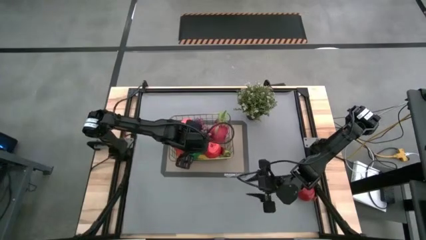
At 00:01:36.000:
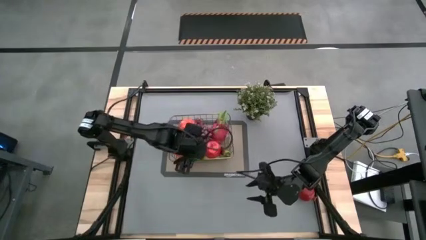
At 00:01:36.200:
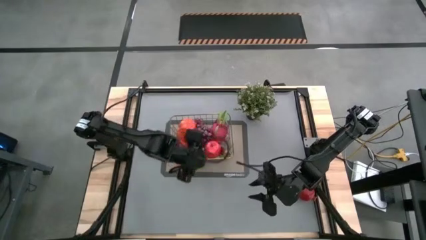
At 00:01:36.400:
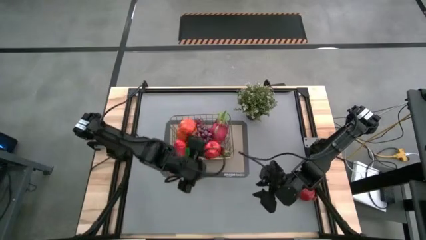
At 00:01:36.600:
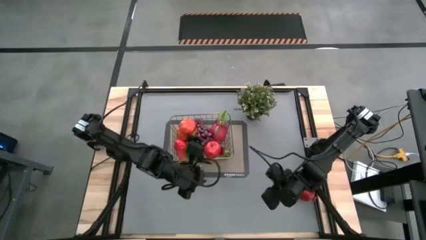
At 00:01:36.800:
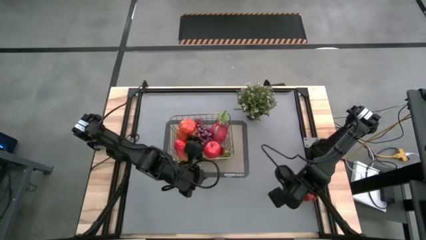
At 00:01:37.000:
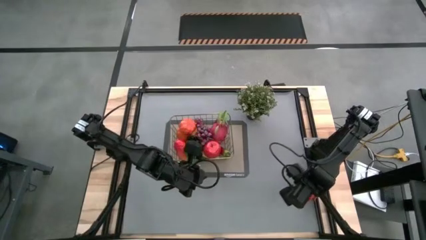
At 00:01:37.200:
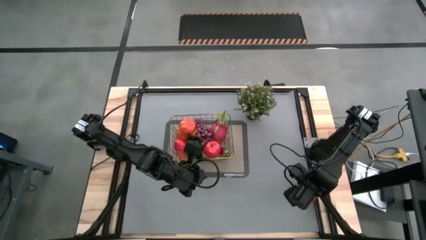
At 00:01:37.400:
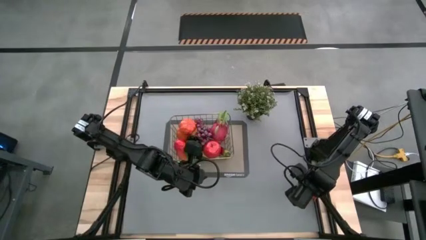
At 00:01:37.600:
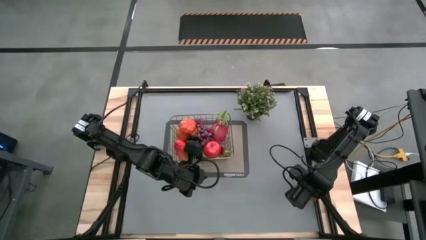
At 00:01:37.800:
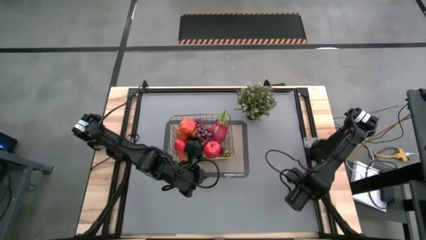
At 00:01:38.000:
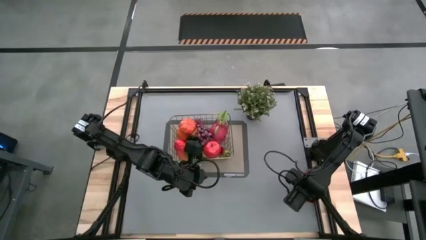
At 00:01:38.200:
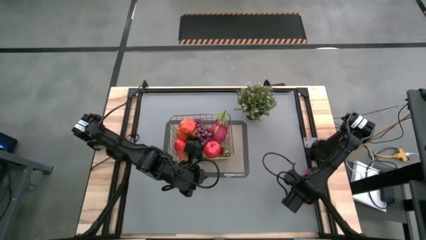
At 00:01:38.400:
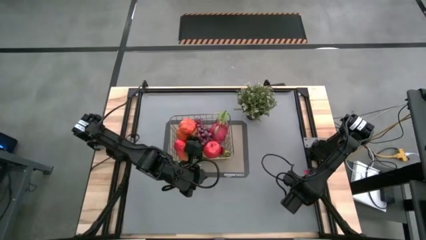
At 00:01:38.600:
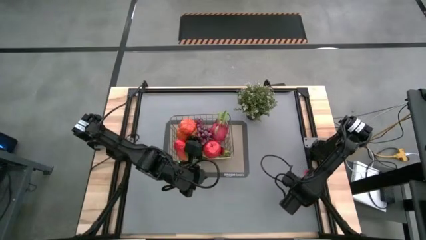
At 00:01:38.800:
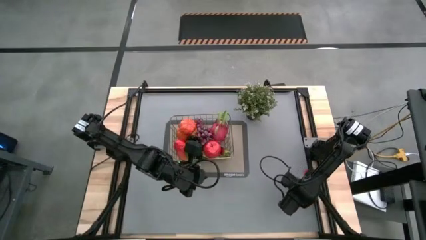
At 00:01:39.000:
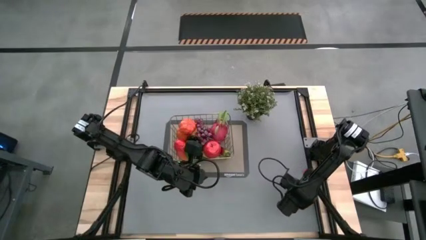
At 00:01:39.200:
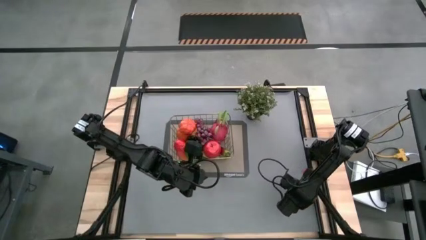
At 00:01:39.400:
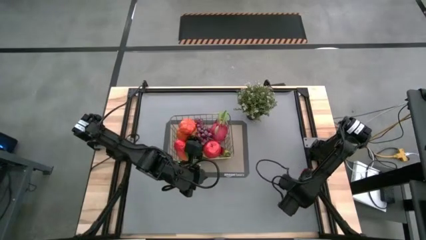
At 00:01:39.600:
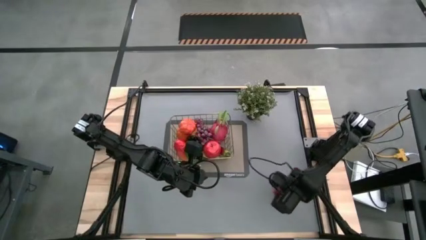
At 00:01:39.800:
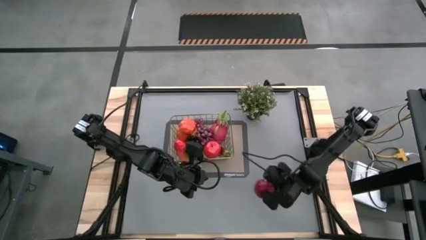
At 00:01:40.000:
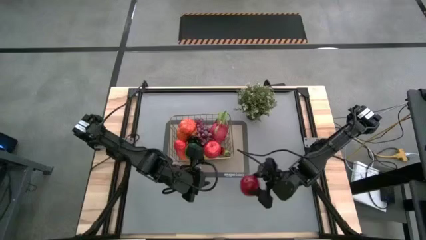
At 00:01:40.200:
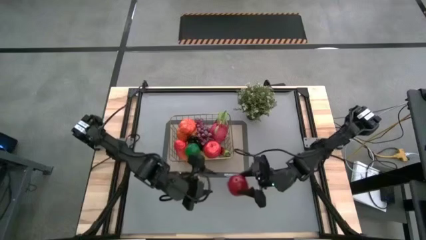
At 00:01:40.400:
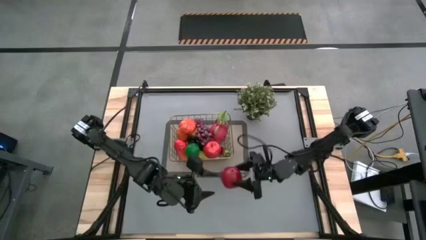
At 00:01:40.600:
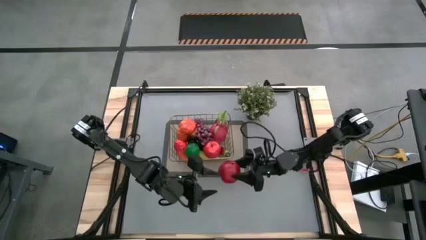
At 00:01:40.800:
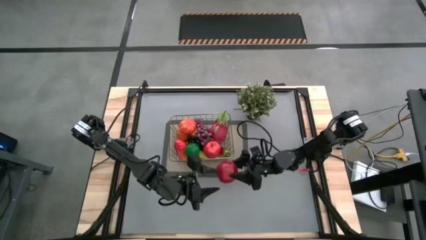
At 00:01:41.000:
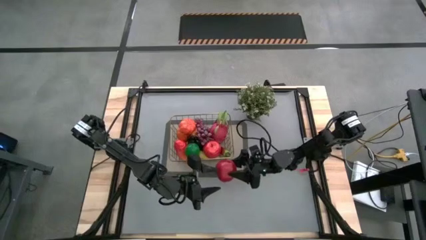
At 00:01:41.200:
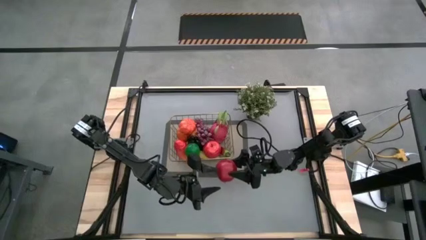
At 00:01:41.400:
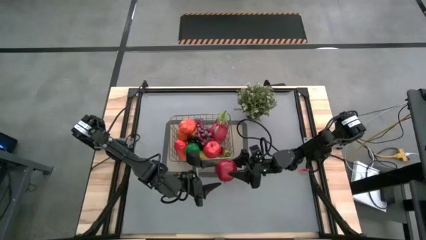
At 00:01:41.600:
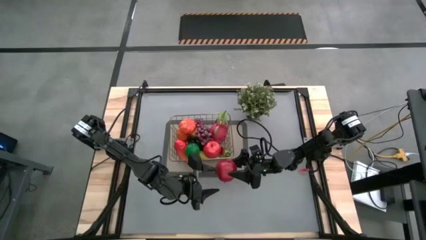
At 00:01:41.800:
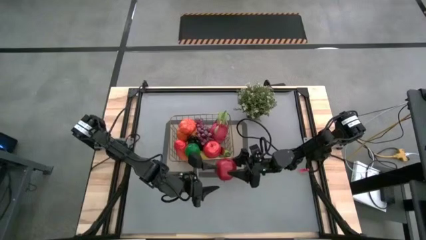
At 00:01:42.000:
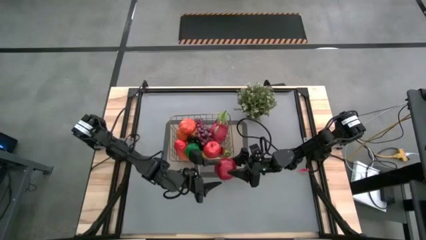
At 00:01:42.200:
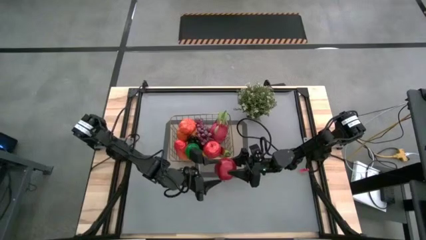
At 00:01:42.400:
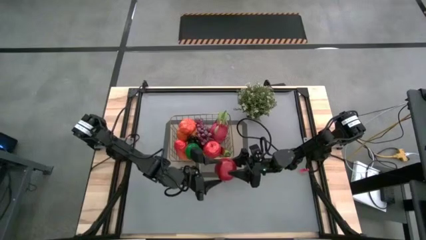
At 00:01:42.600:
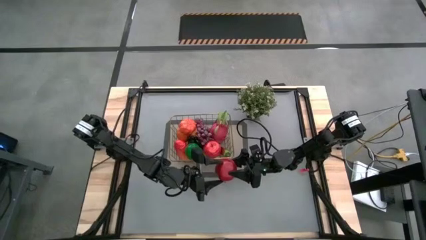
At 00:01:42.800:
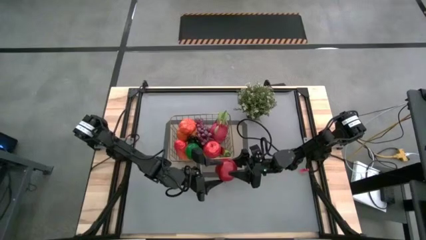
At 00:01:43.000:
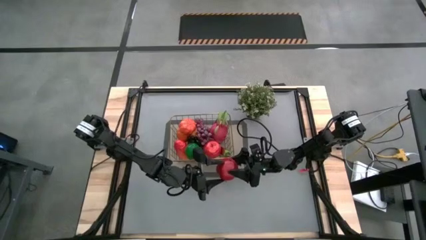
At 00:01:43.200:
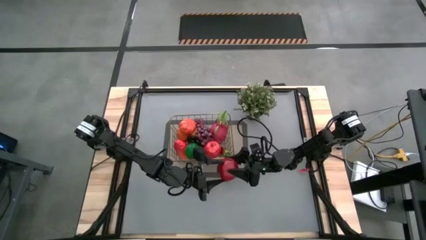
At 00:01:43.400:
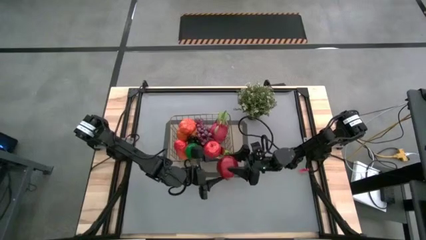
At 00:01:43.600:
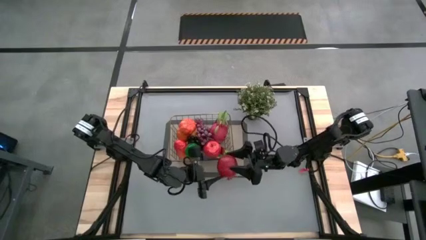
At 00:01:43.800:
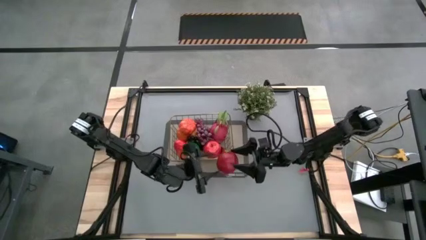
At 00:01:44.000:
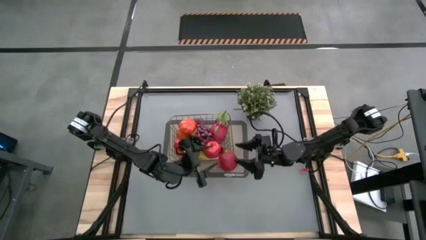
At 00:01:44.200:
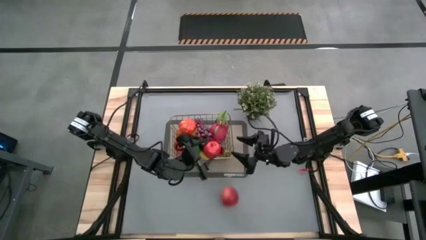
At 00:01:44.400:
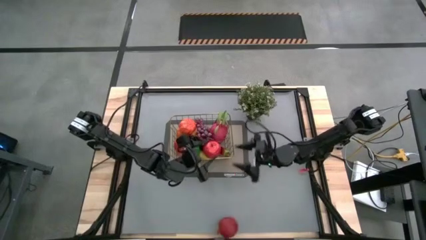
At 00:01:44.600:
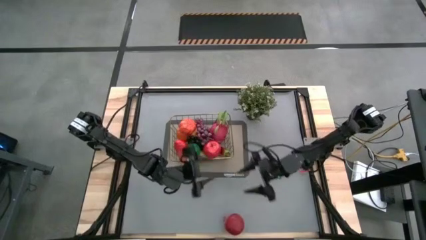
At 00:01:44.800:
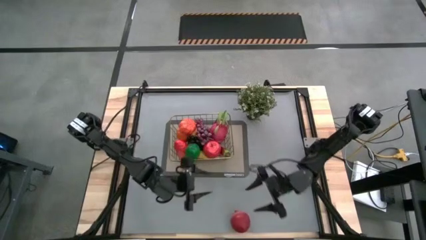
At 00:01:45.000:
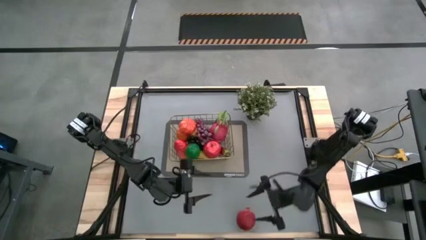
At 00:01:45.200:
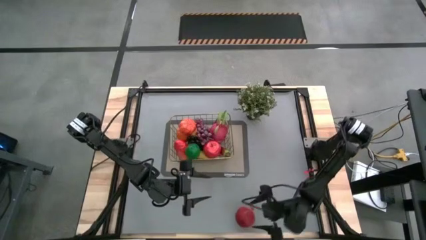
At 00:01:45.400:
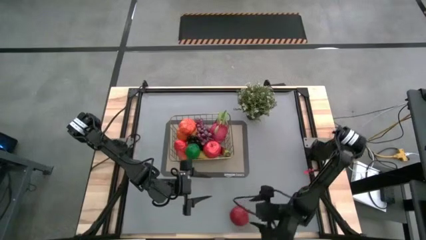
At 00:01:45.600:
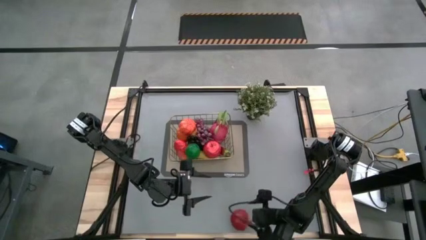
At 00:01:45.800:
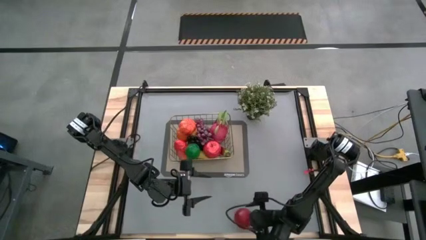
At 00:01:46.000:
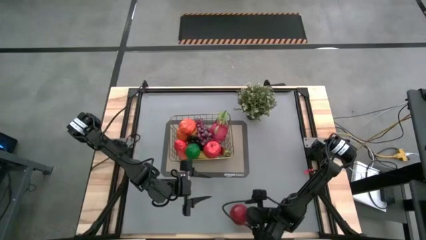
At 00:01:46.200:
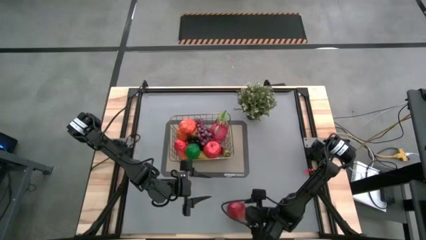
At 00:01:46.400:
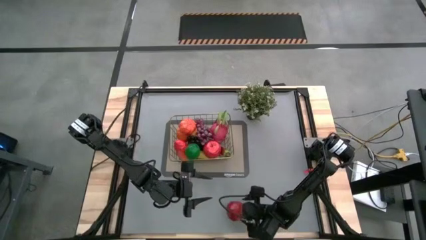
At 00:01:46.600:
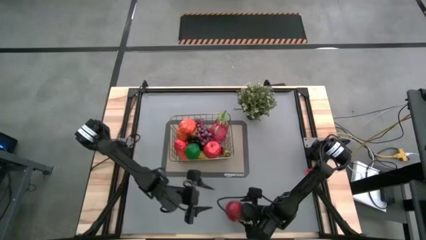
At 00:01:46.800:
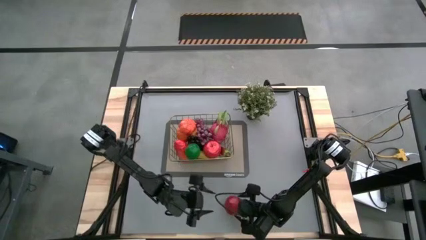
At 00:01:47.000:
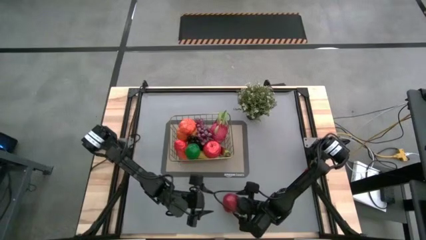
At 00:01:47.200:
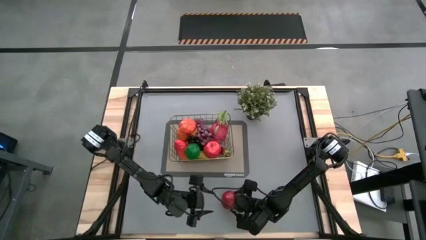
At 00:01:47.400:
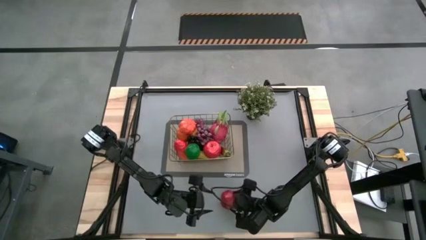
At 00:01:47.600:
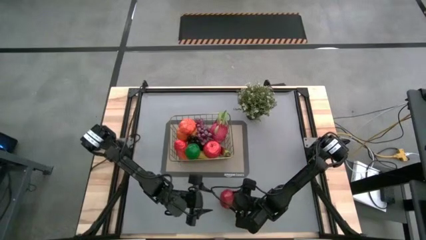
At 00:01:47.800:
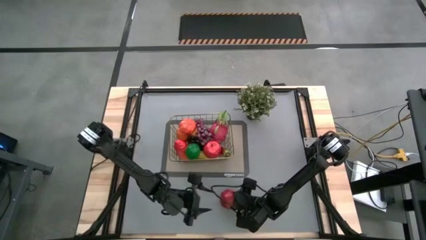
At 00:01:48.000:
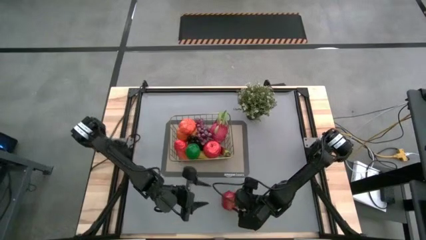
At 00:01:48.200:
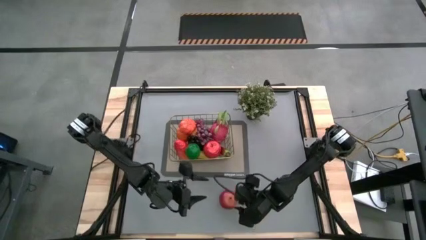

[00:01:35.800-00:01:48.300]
Task: Build produce basket
Put the pomegranate into the wire basket

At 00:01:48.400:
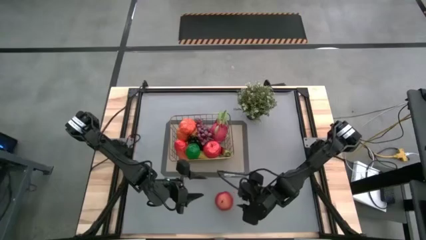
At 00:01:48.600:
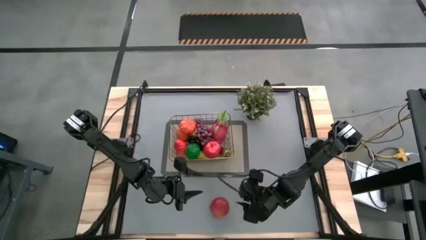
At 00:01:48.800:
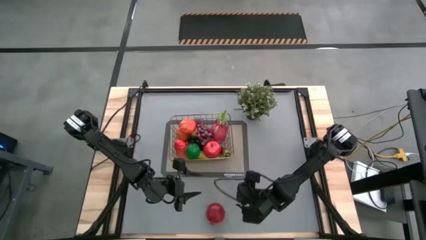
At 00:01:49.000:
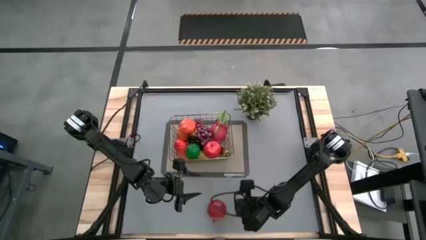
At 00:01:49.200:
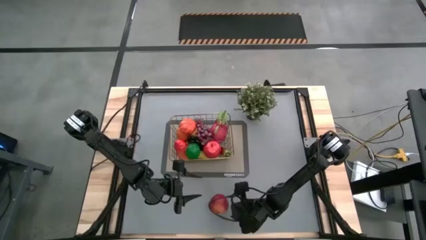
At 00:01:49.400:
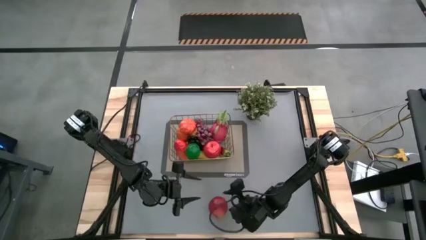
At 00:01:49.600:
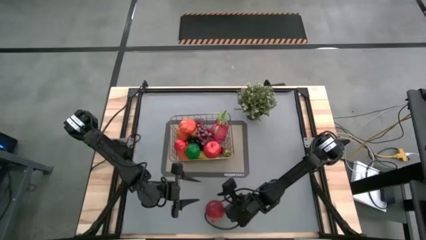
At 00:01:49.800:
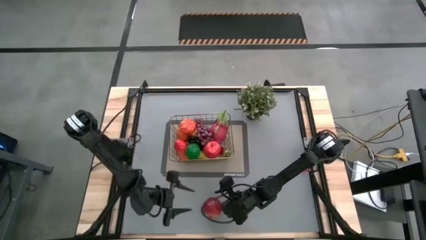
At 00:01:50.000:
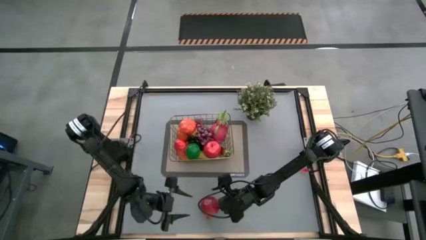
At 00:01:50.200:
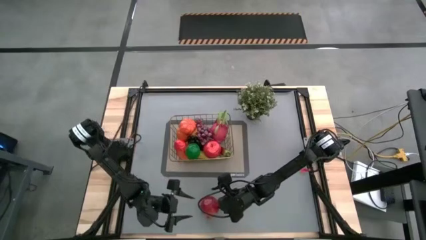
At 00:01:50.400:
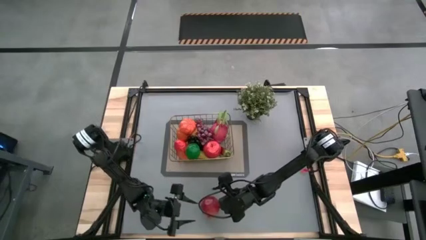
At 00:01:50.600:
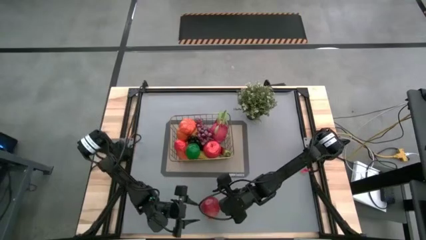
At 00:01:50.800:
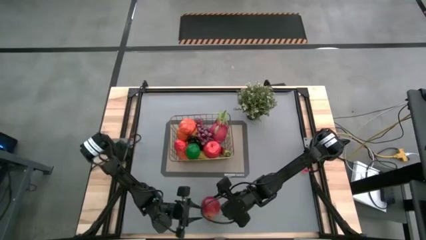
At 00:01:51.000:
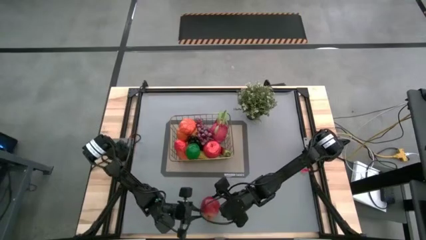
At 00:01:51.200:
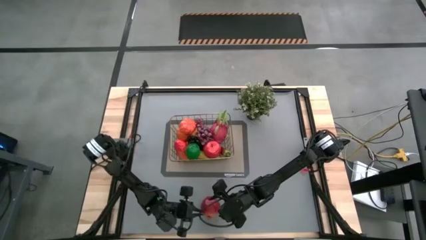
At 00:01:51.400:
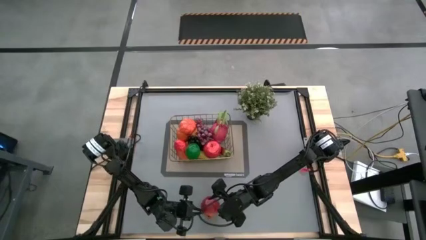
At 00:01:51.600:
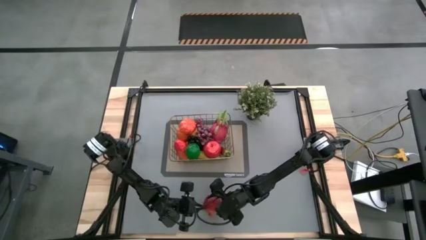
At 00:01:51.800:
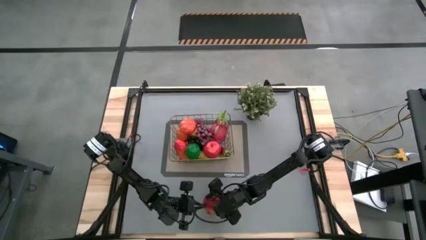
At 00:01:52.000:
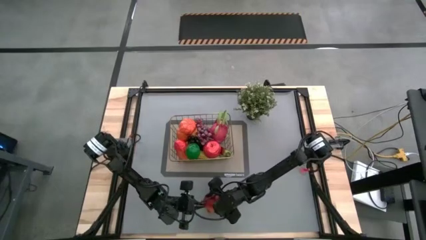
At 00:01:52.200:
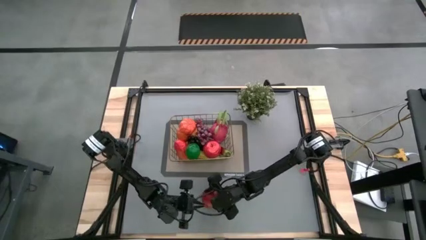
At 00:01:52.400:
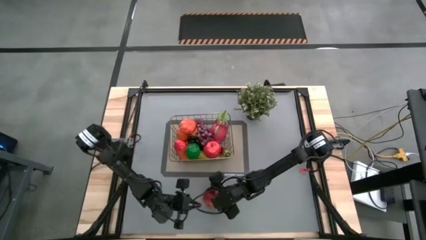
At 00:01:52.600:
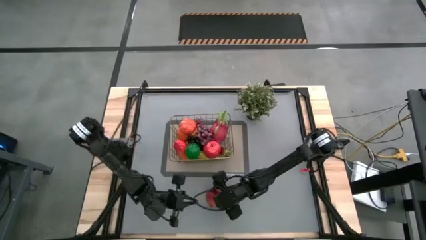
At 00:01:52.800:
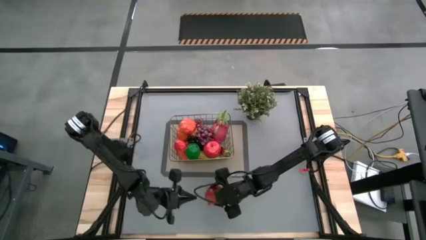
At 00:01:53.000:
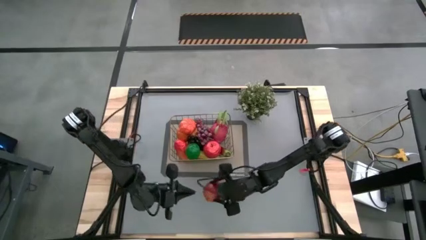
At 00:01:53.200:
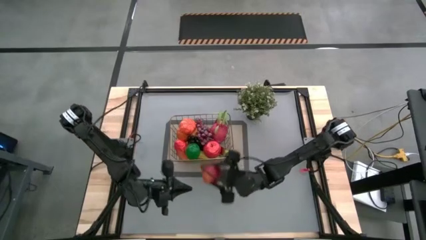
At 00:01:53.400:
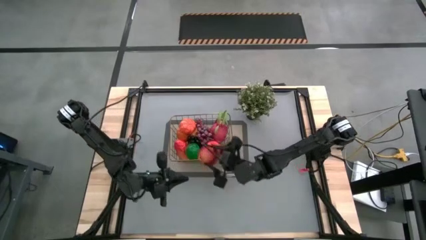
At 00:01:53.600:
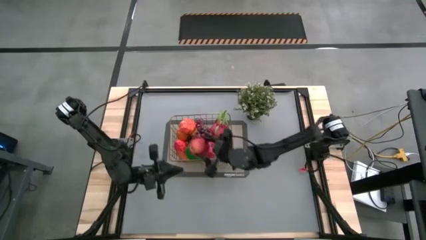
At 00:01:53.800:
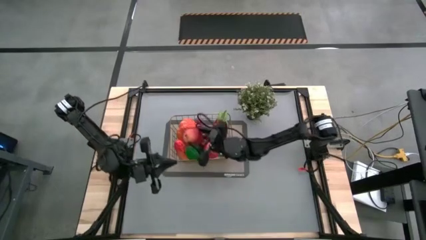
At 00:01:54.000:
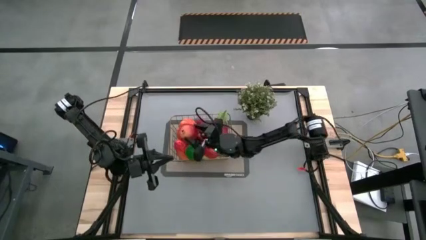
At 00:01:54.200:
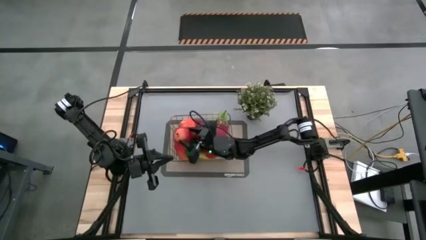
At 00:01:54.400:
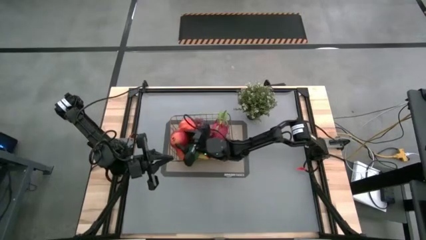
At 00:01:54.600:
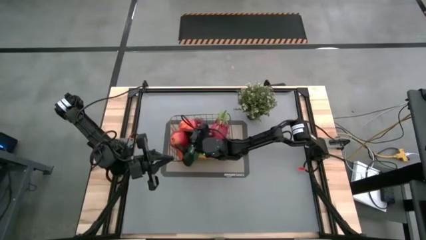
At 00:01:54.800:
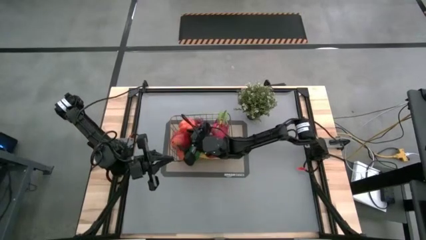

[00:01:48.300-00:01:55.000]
Put the pomegranate into the wire basket
